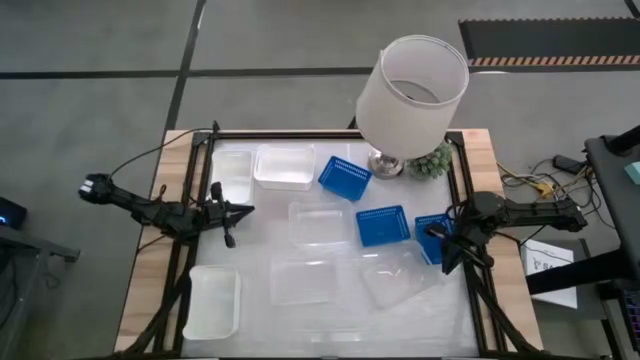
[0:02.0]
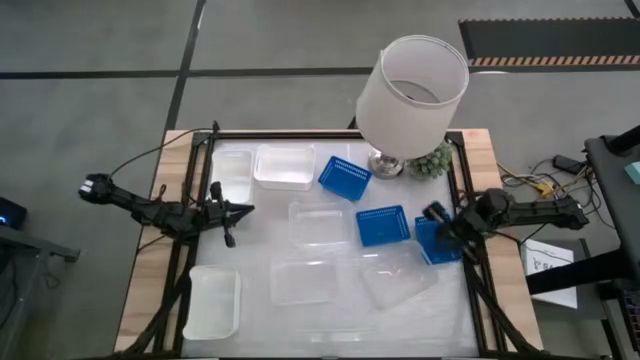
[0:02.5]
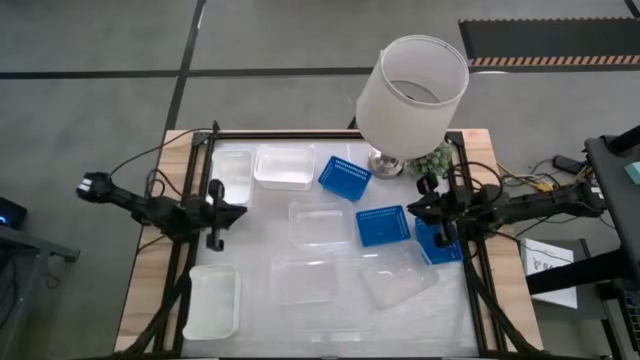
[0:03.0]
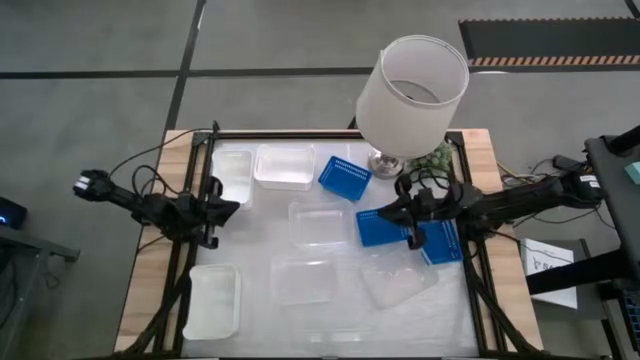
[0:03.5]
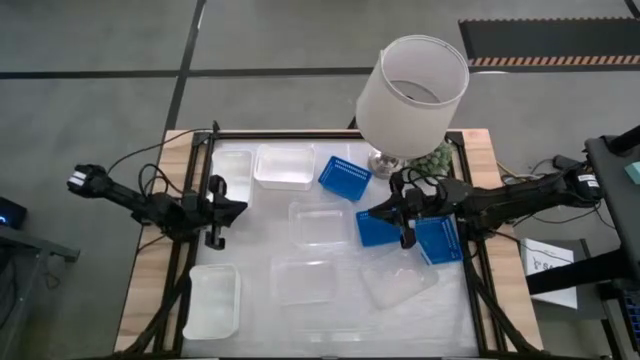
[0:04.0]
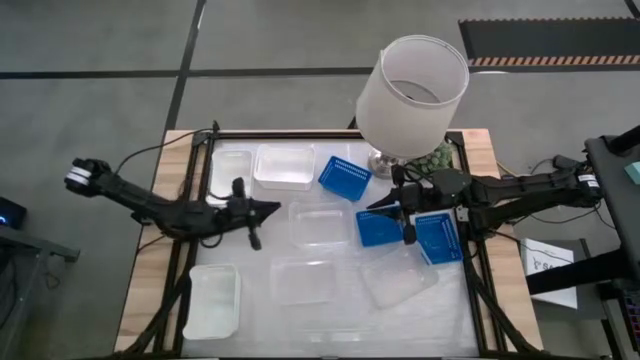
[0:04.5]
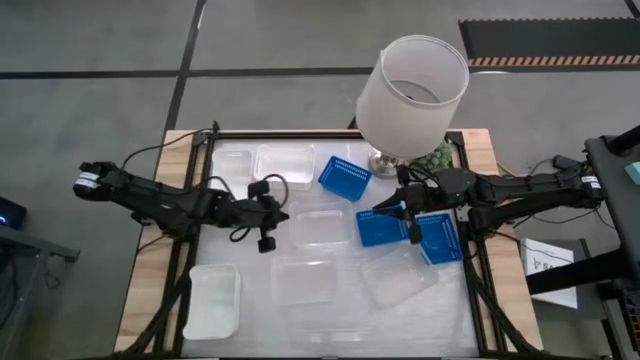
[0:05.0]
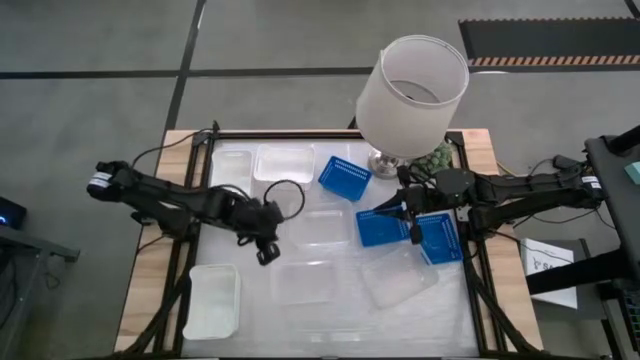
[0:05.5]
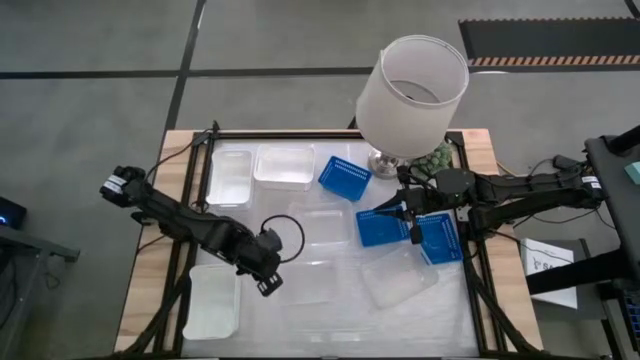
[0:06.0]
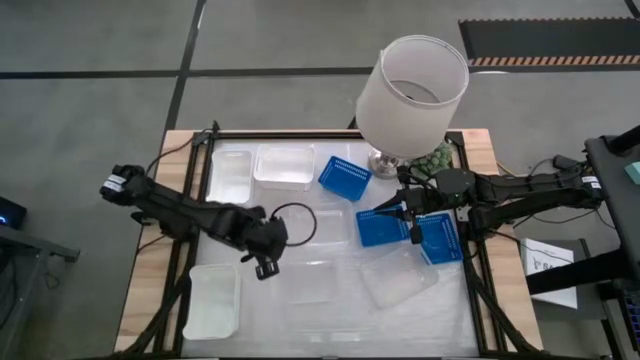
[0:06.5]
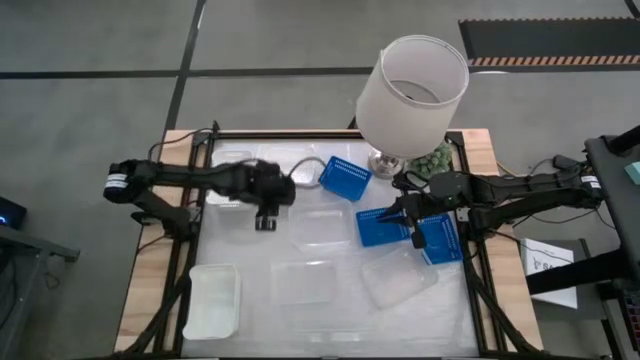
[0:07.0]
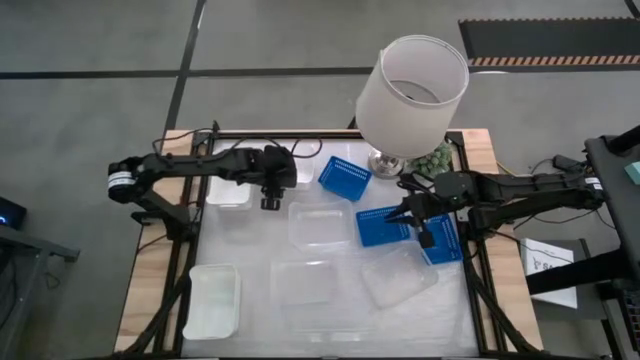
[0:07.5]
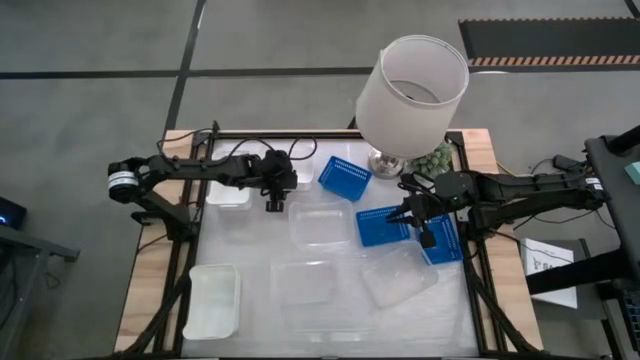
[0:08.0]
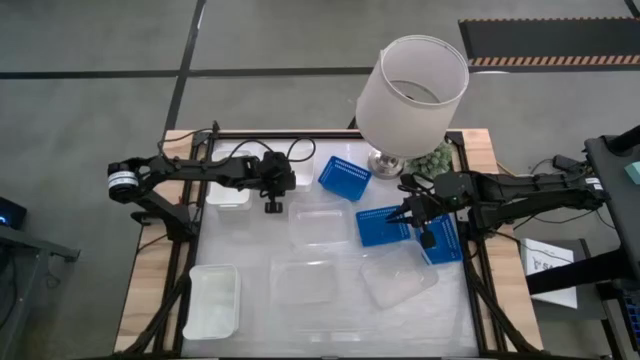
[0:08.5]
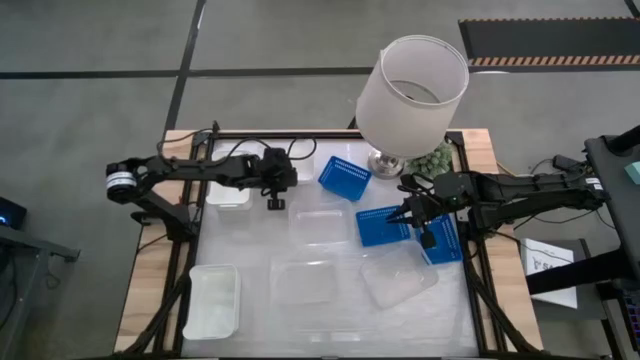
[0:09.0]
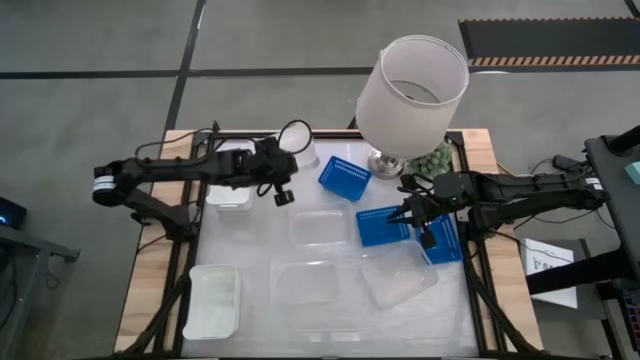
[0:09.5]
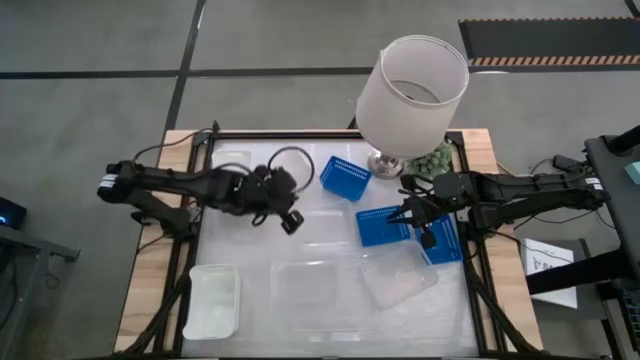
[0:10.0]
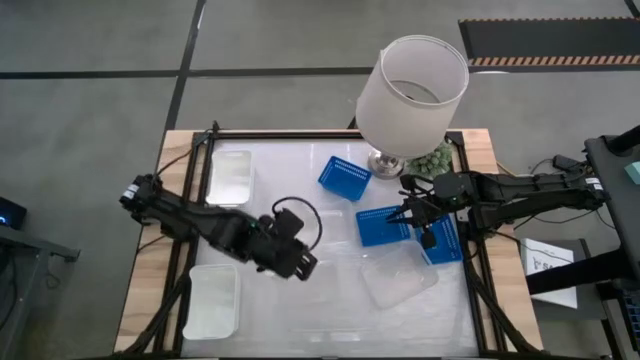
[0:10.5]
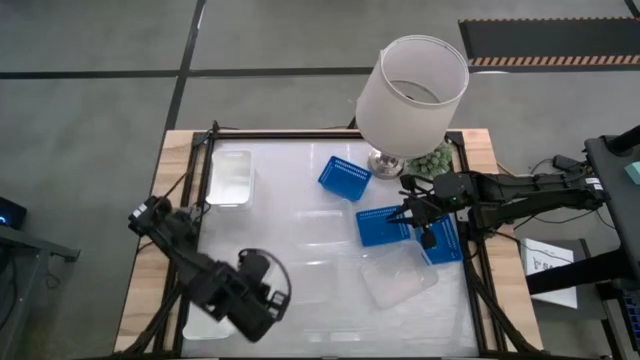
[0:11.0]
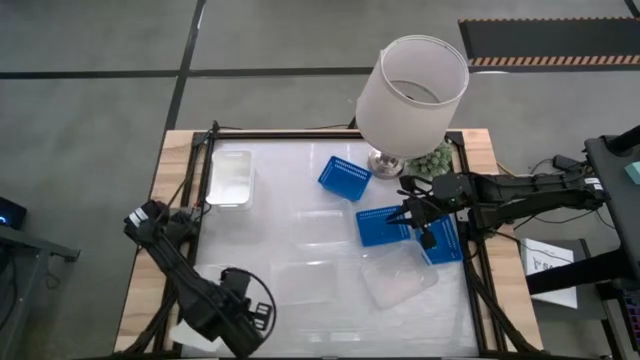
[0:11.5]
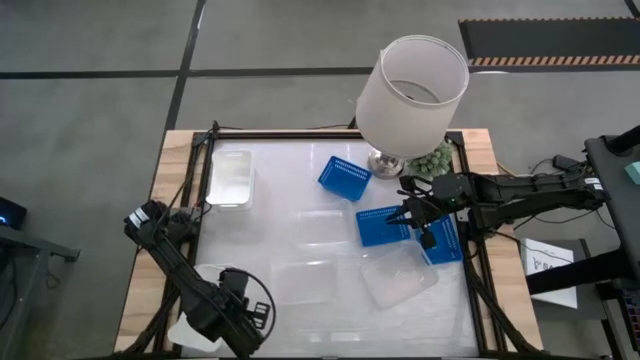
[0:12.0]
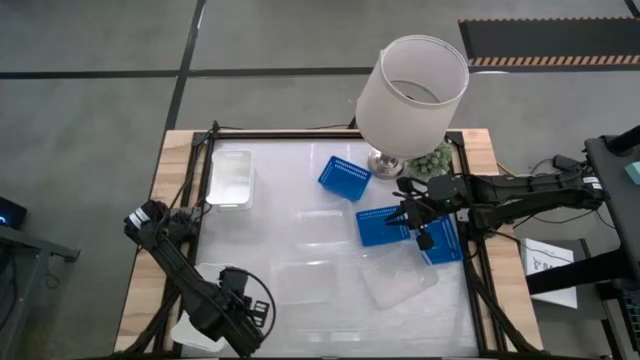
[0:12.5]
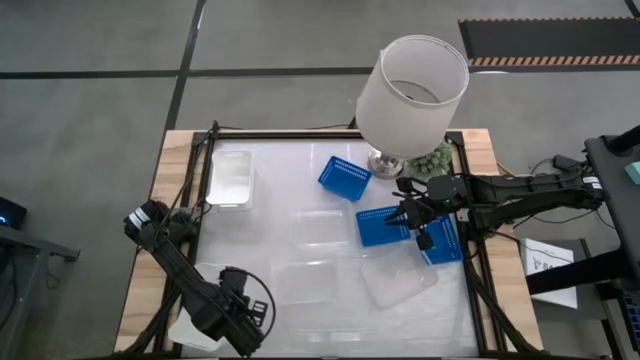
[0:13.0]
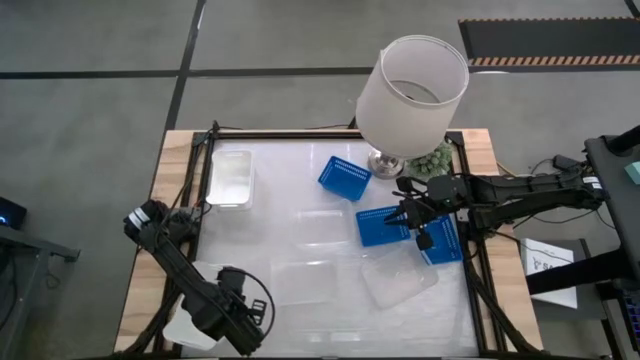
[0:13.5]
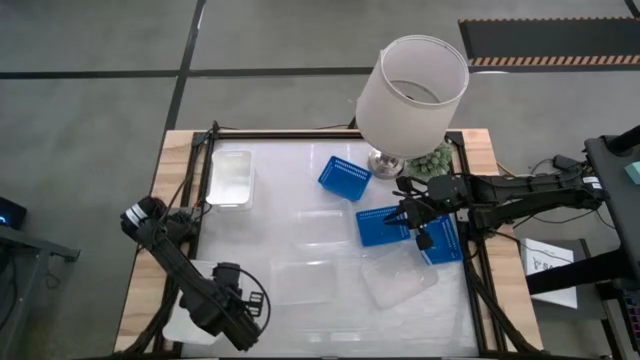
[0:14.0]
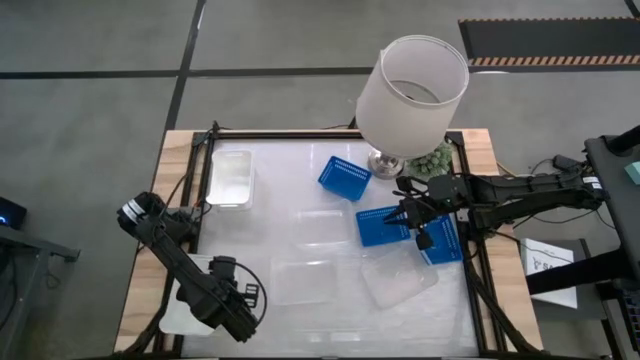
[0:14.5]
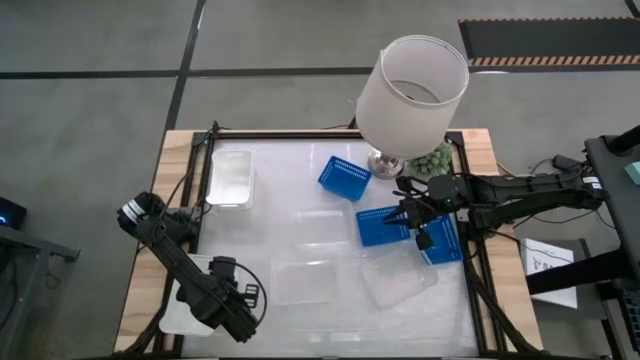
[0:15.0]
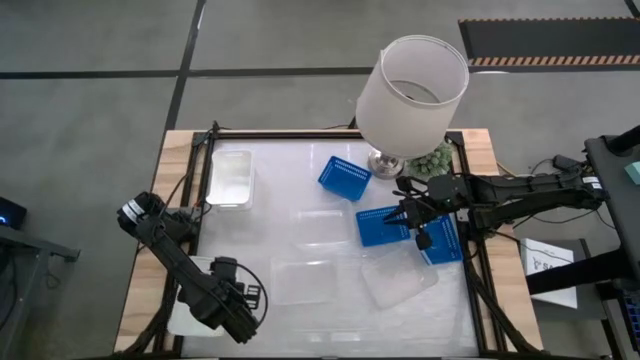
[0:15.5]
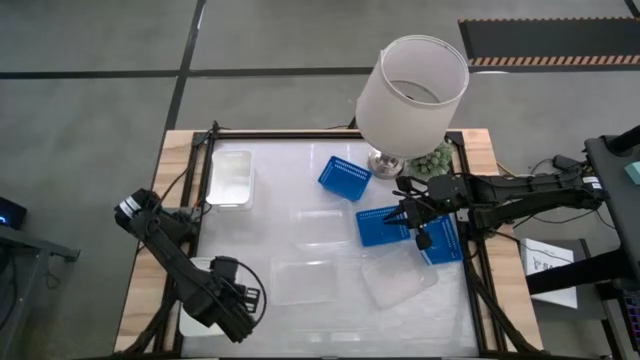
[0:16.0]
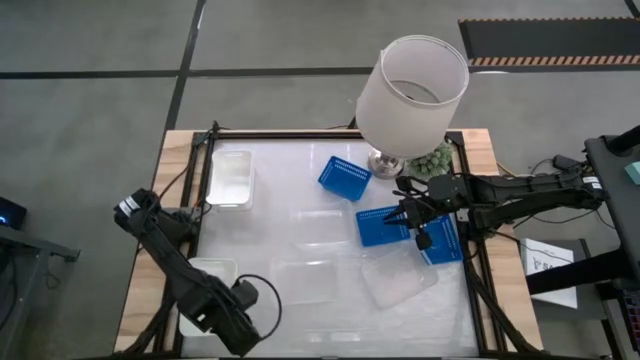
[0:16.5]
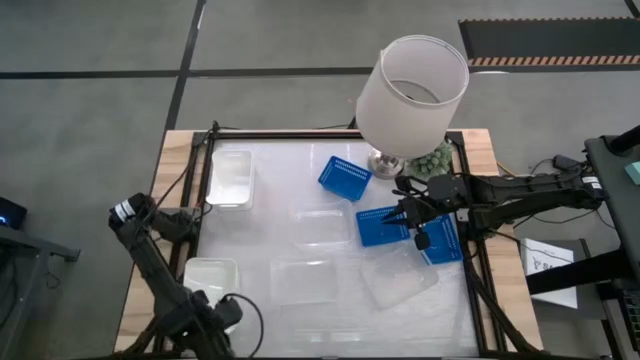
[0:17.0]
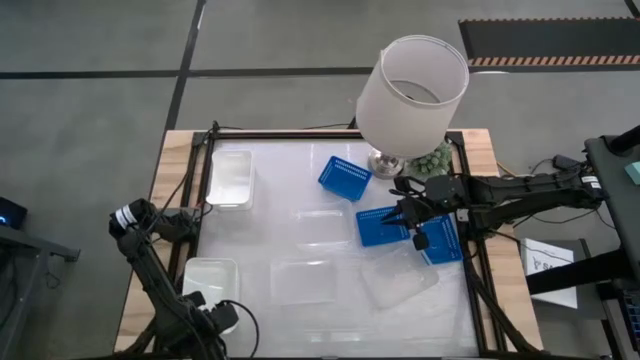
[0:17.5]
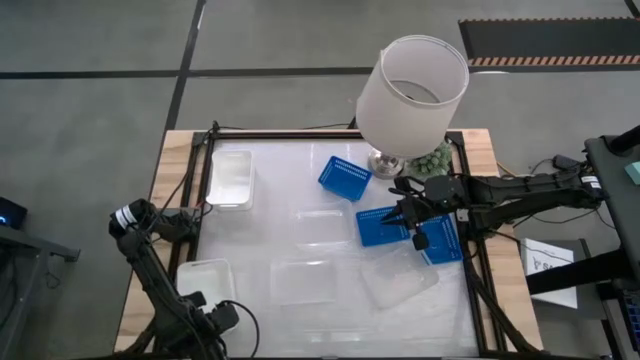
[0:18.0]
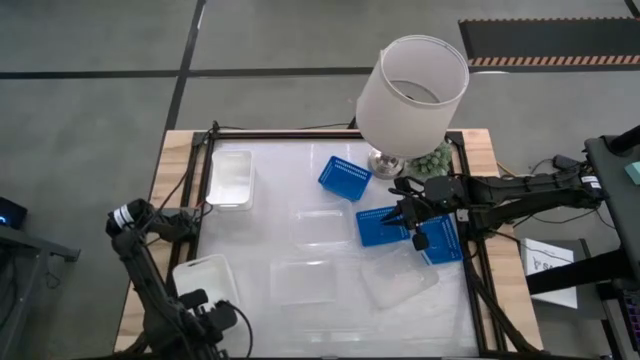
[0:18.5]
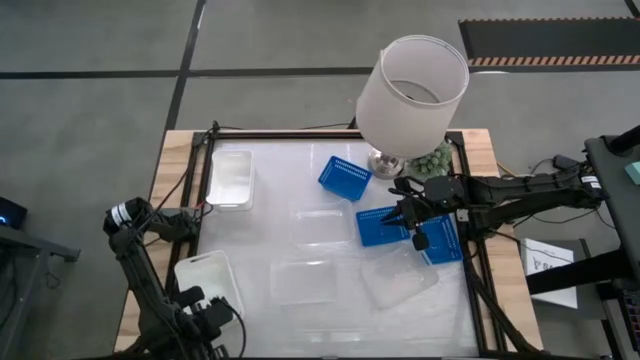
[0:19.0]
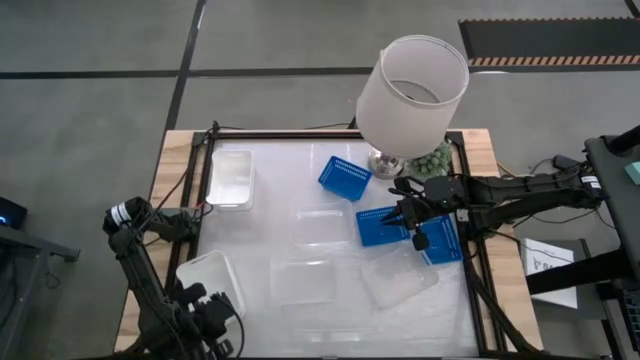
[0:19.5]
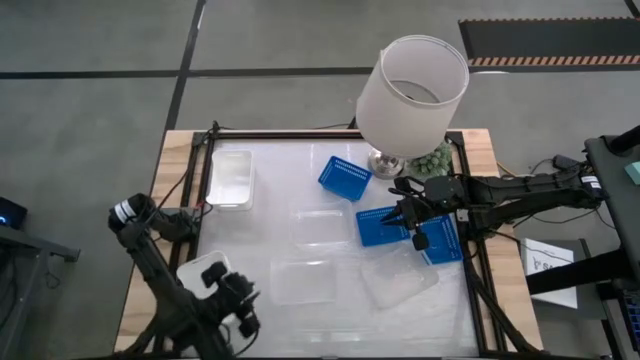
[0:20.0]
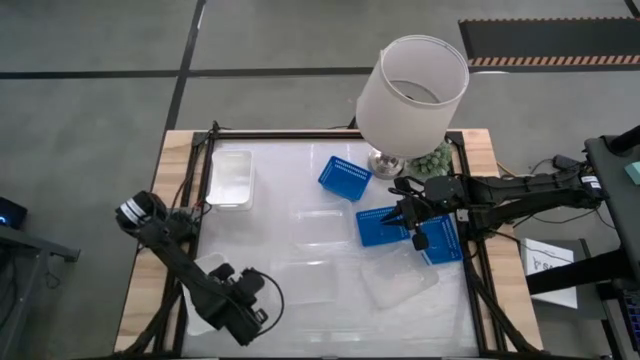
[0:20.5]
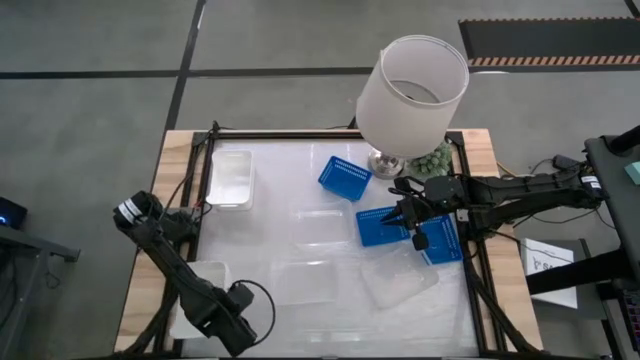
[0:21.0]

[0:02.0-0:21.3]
Stack the top right white bin on top of the bottom white bin
